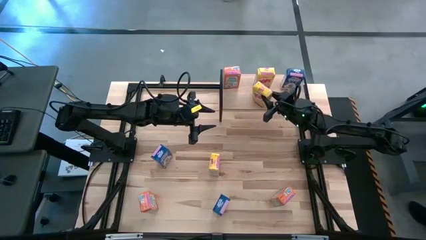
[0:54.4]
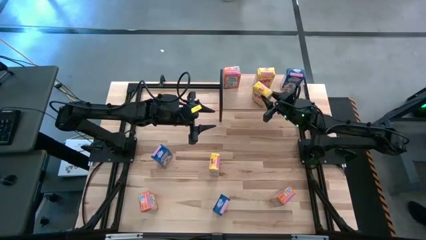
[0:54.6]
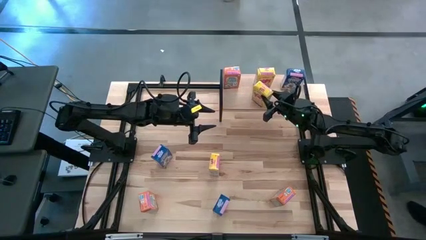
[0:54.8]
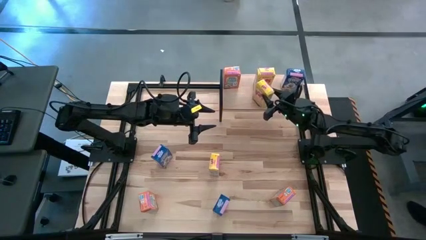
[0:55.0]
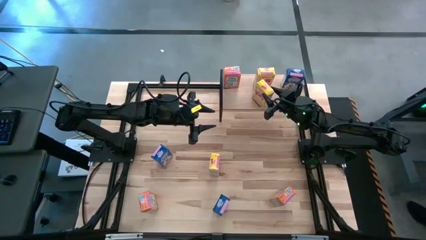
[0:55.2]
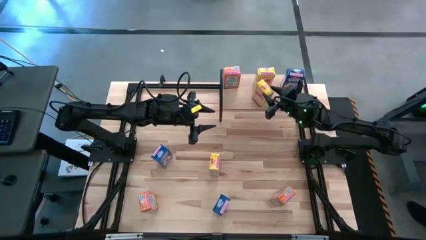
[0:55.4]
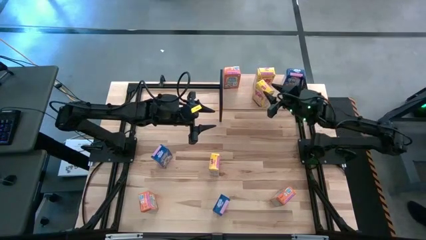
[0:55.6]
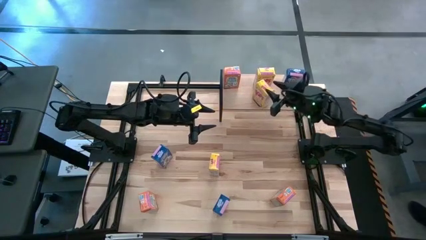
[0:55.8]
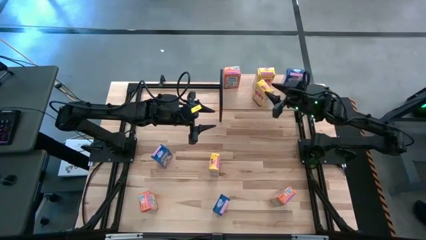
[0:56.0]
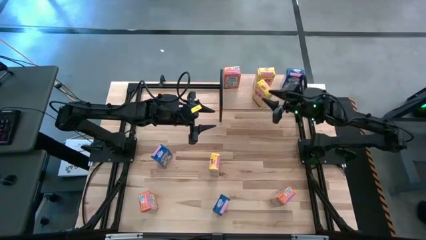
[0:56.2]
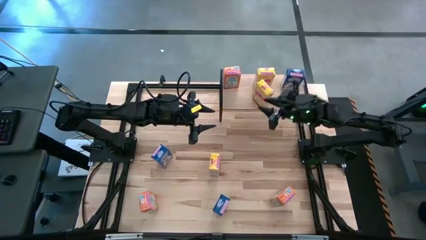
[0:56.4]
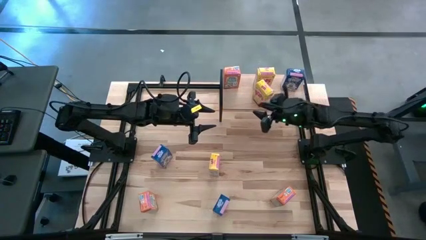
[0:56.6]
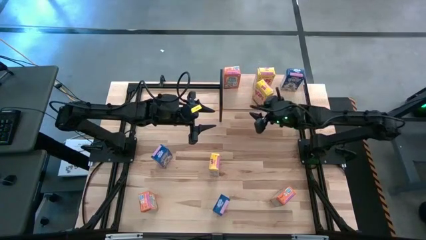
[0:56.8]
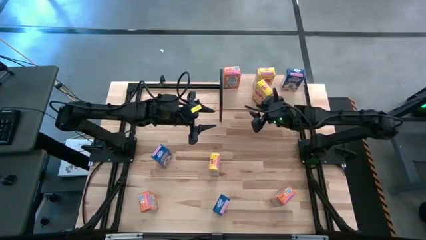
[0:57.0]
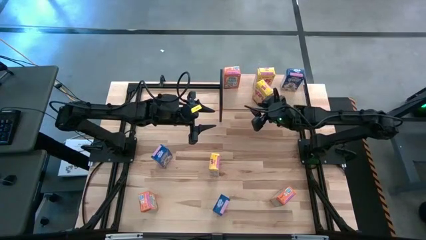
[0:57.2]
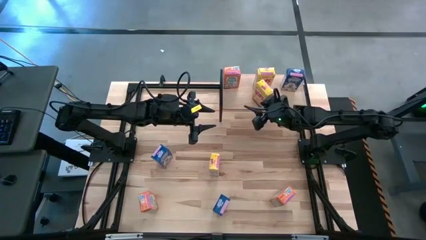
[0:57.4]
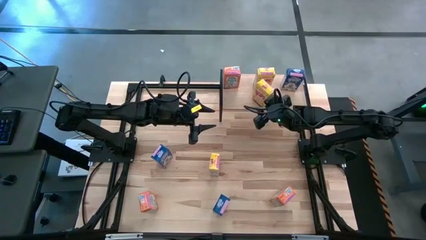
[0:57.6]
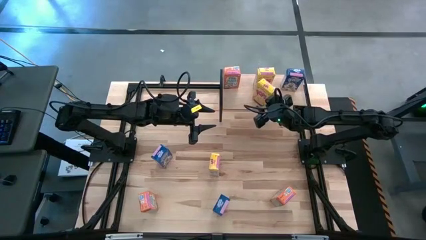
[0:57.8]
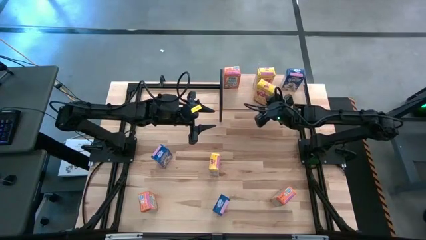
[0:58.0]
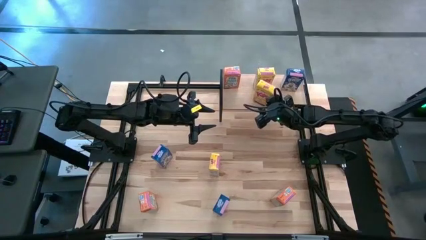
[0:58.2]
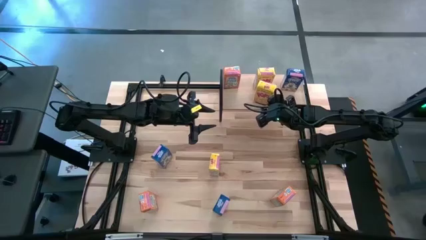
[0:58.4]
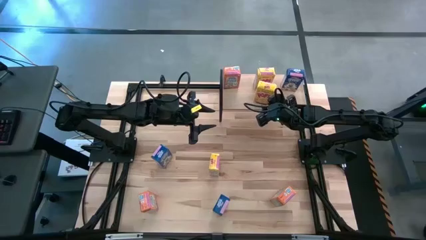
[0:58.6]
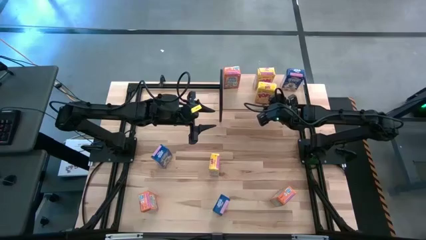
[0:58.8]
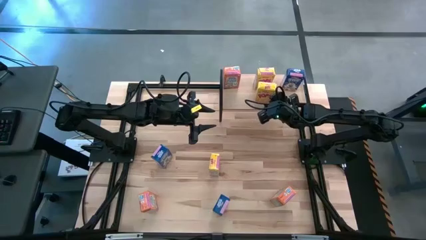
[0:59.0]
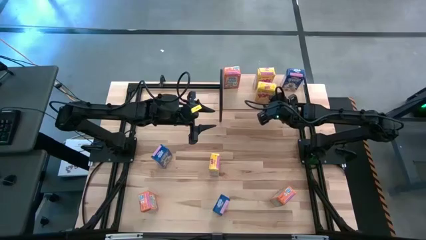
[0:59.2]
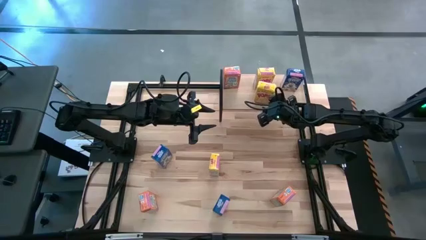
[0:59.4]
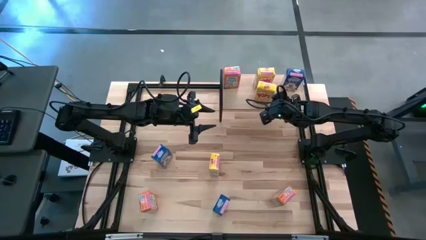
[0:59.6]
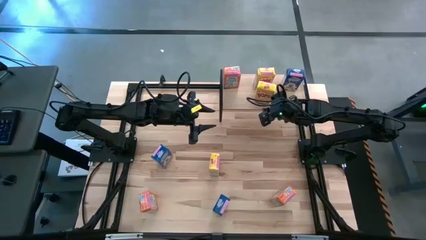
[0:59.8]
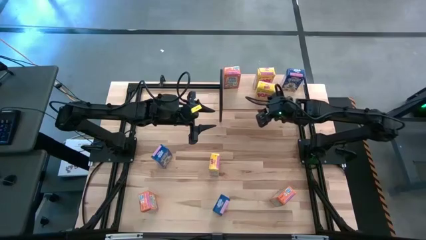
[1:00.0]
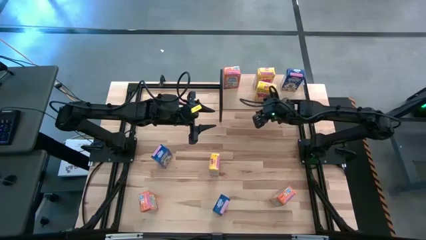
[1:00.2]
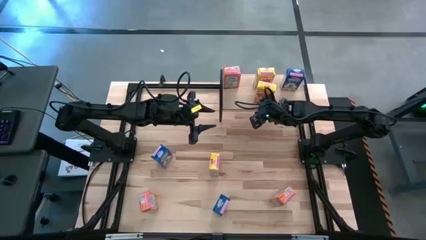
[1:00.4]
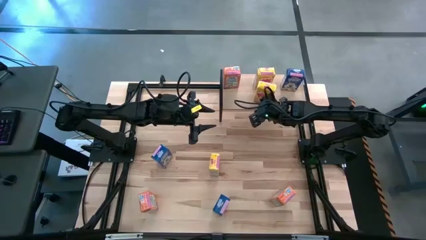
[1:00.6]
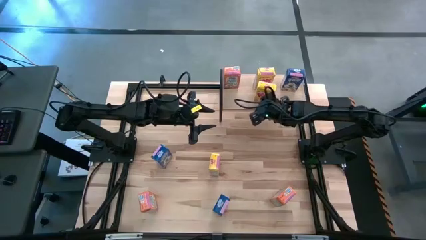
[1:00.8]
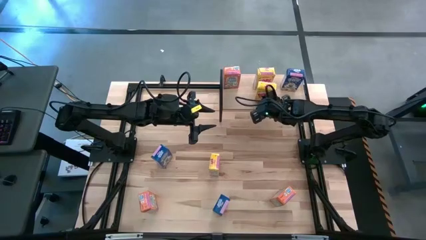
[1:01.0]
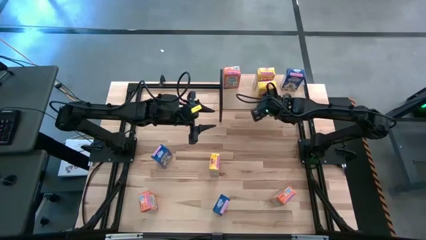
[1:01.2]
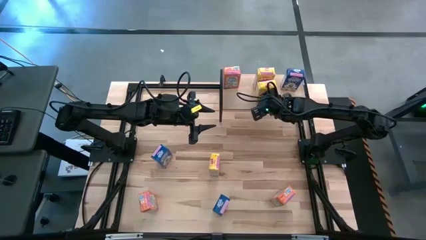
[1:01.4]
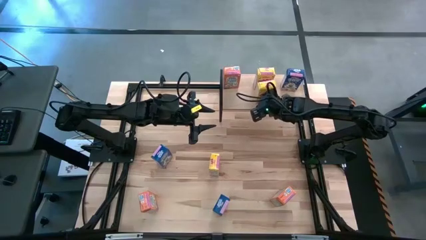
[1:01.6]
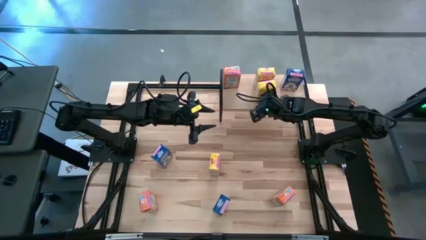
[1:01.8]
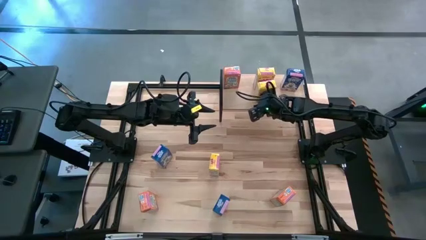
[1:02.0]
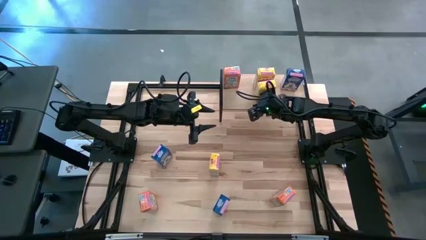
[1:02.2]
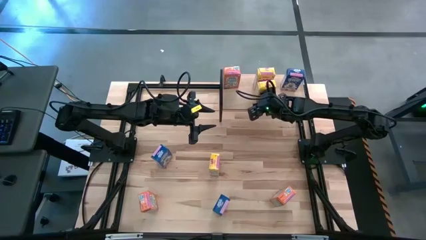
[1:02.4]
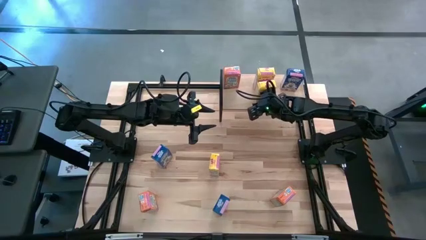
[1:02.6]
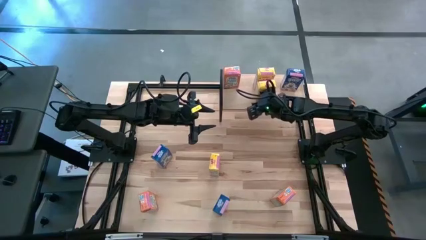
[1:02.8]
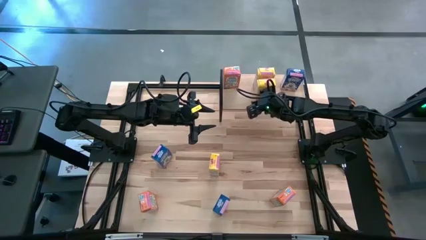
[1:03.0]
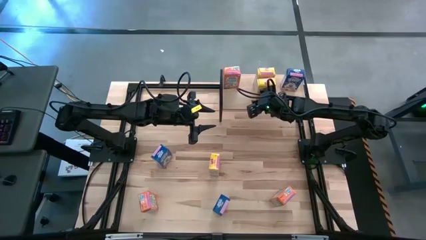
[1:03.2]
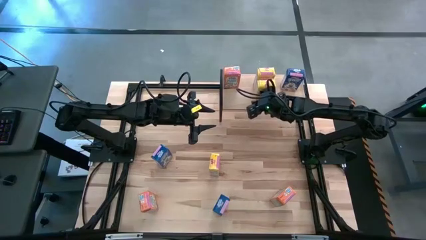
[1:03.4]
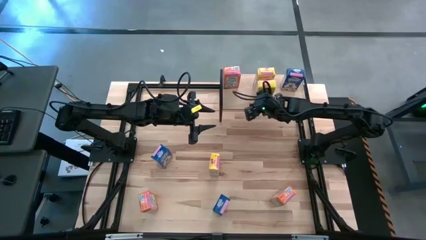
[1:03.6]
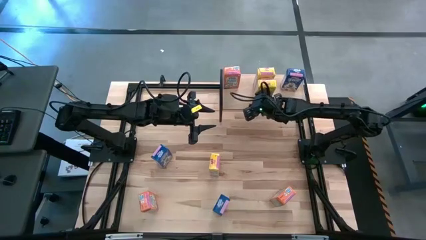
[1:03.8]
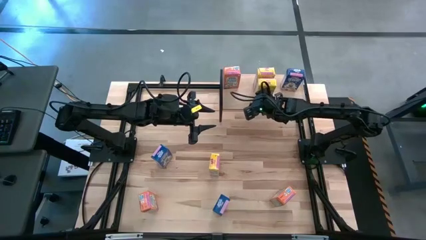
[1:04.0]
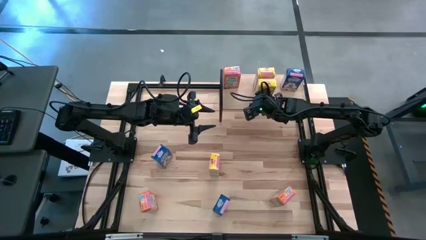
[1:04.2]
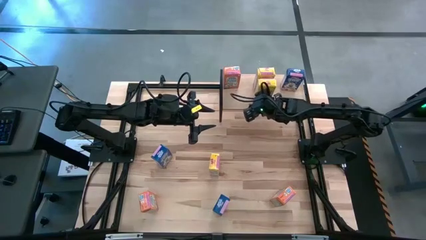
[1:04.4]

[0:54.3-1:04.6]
Task: Stack cereal on shelf
Put the top yellow cereal box on the shelf aligned with the yellow cereal box

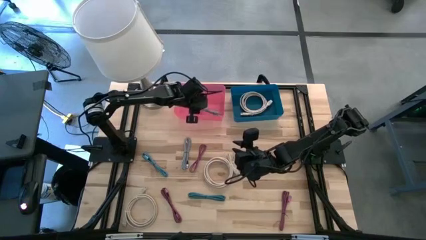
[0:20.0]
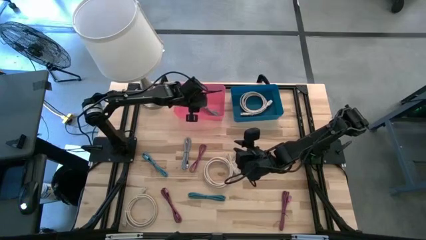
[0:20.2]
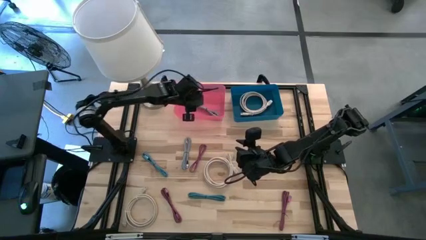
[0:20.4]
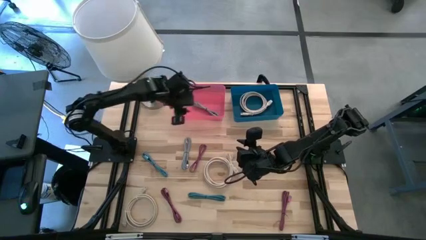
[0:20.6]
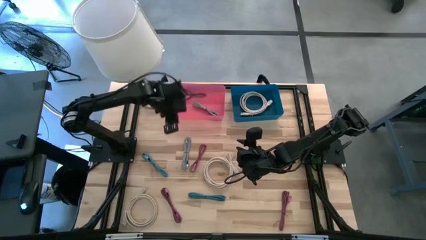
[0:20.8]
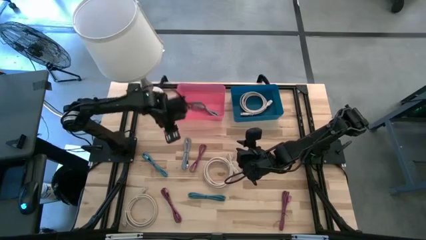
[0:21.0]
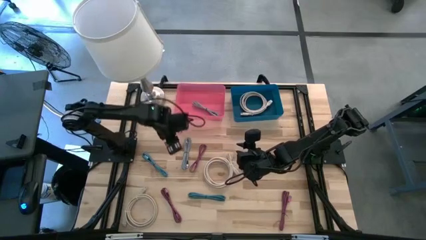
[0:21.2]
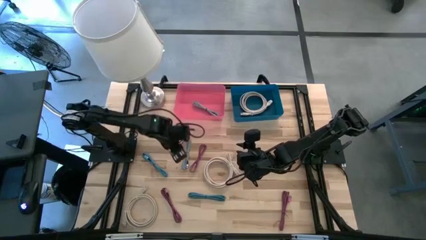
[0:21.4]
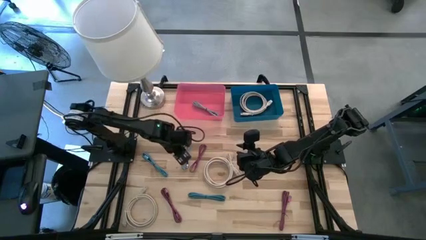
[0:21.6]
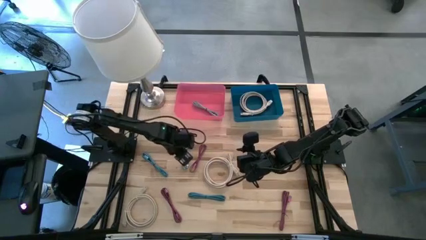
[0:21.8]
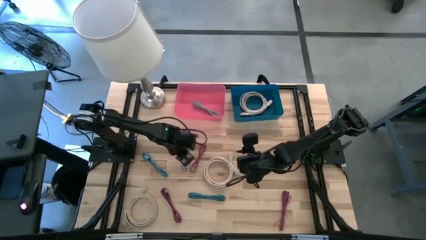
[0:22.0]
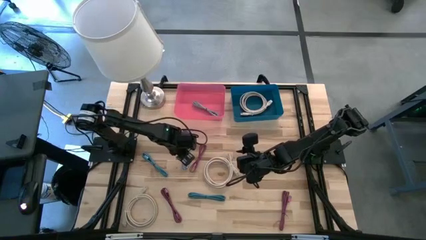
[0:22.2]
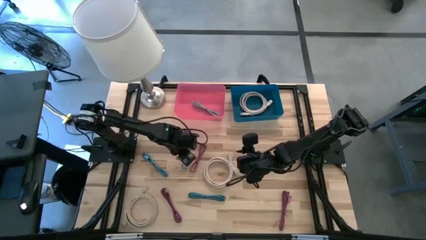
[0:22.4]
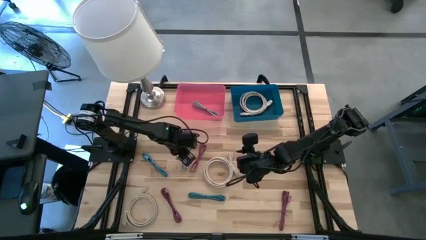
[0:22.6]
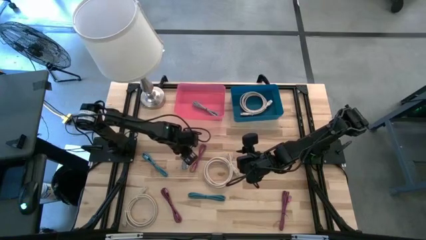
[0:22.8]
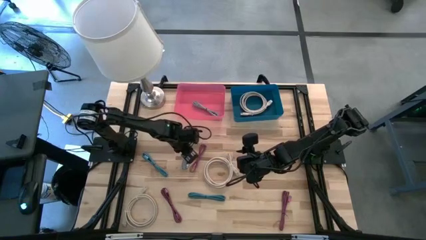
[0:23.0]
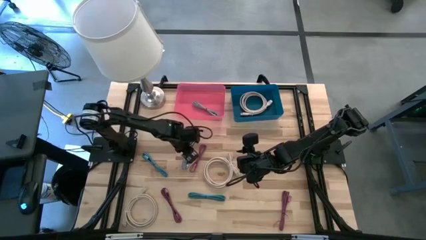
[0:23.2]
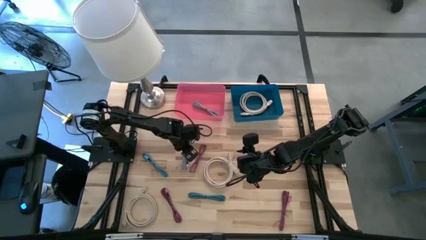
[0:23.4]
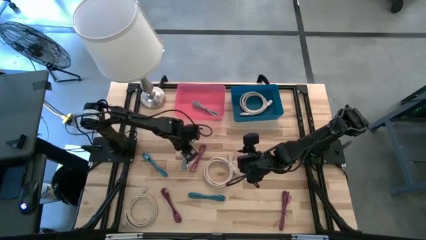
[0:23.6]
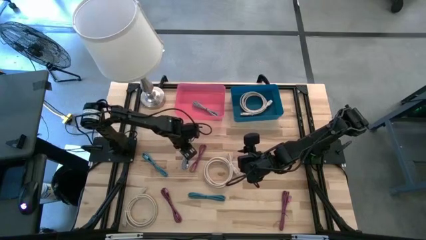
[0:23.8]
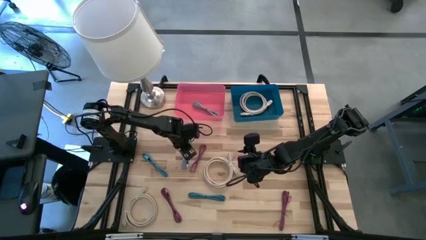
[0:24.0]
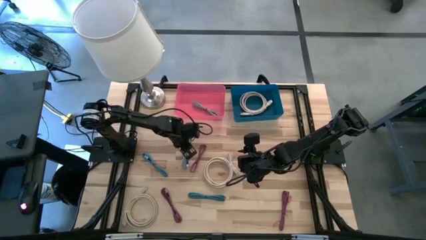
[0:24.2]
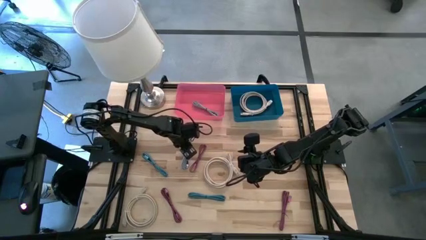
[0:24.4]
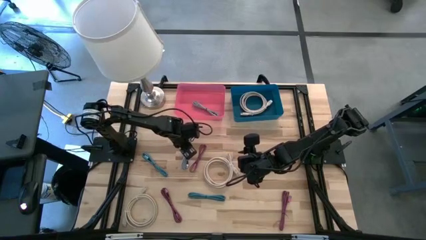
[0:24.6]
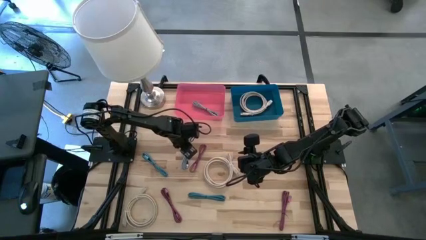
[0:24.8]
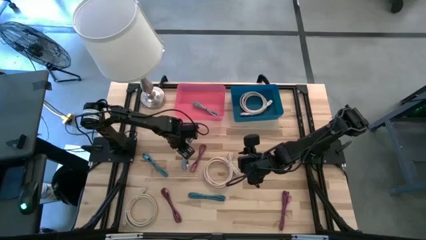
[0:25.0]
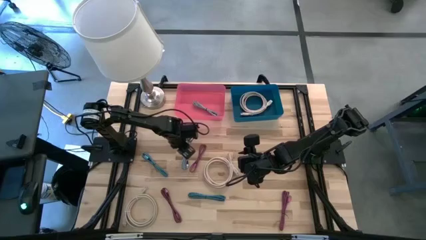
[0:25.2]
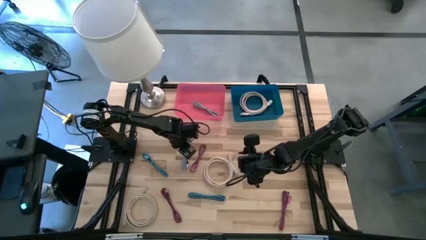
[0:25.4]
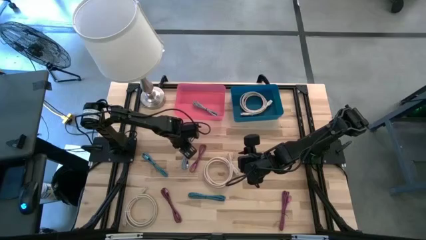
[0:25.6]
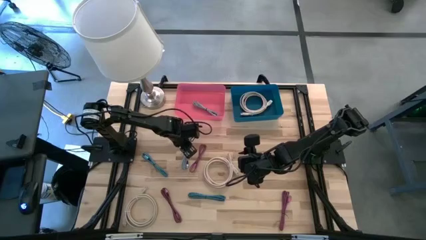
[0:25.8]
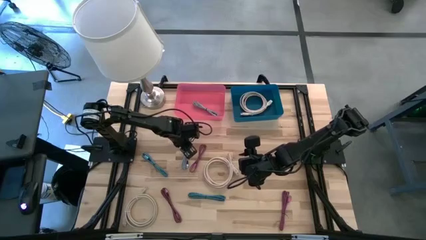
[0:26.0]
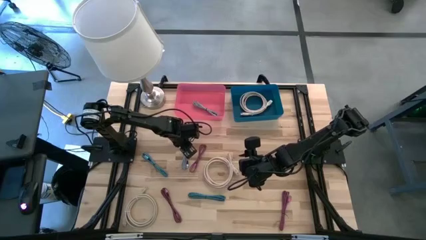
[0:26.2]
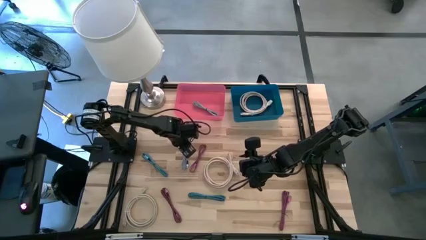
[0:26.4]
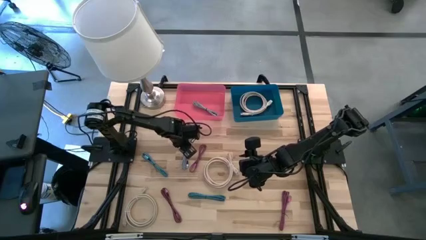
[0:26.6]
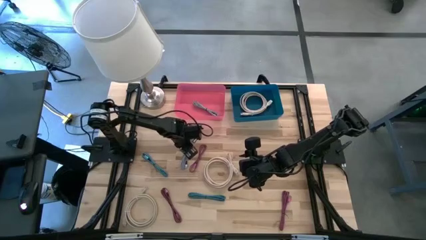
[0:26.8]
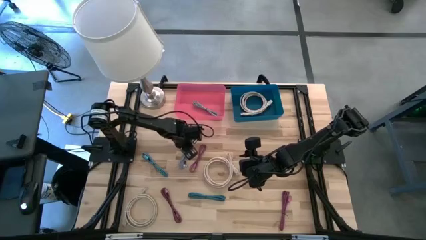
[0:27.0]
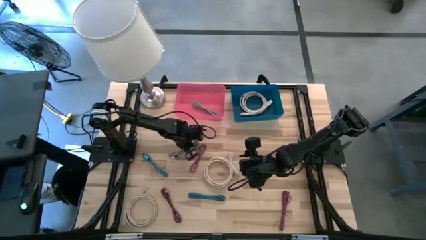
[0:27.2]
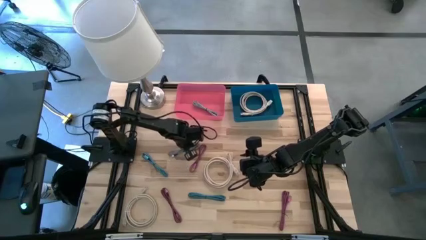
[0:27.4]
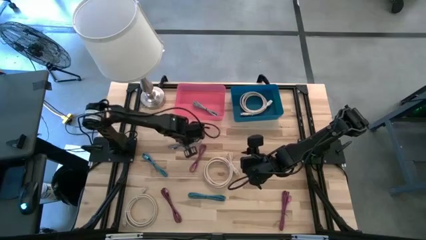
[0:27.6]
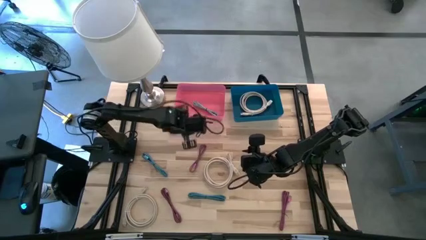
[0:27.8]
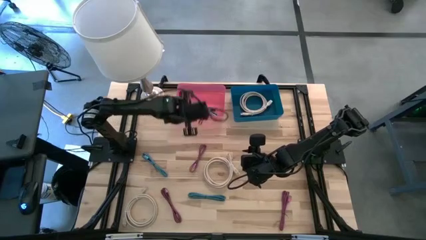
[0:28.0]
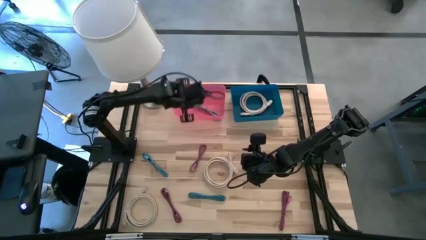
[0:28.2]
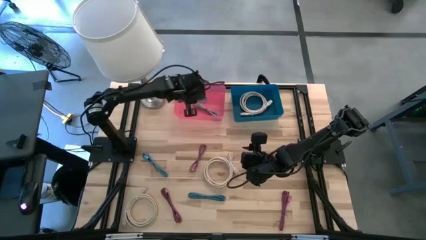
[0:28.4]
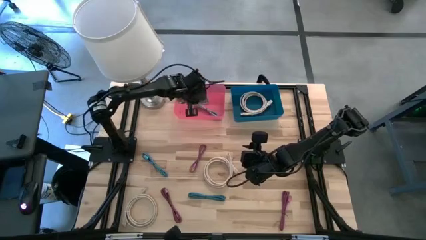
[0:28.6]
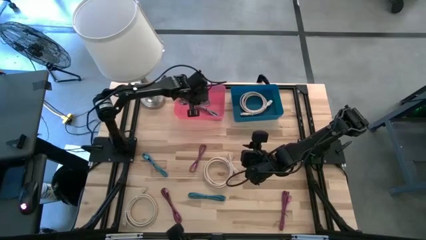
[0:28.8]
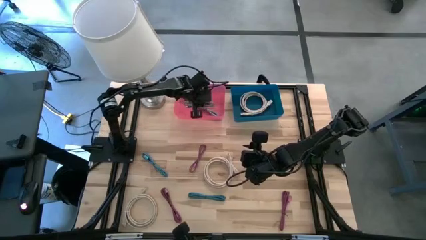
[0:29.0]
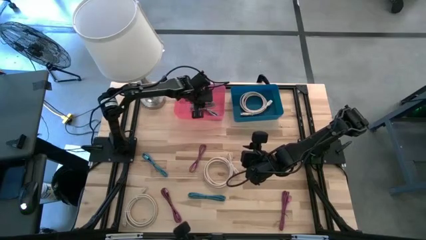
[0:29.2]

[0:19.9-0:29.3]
Task: Pick & Place USB Port
Put the black and white charger cable into the red bin
